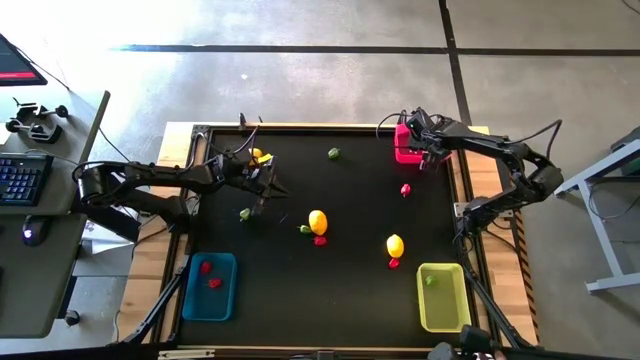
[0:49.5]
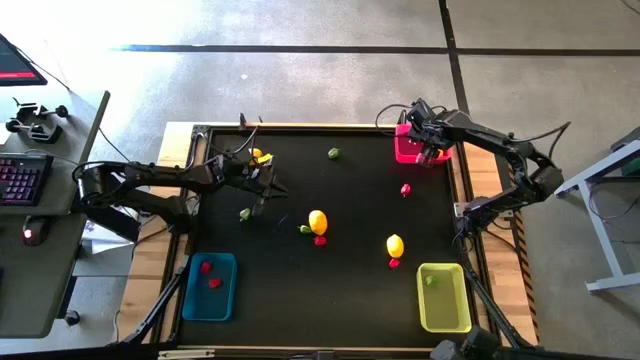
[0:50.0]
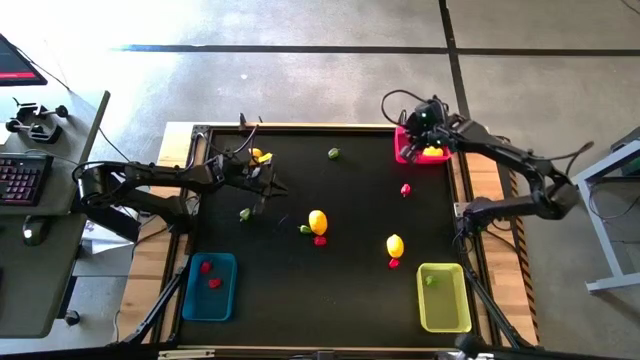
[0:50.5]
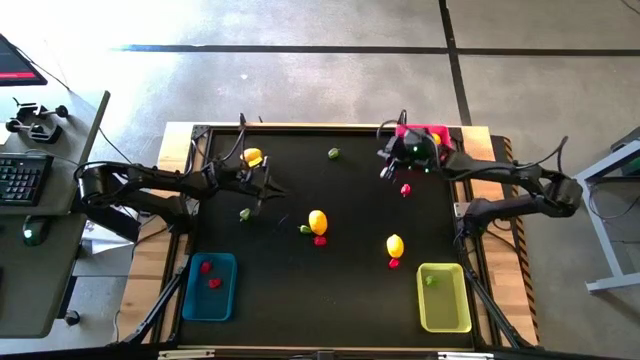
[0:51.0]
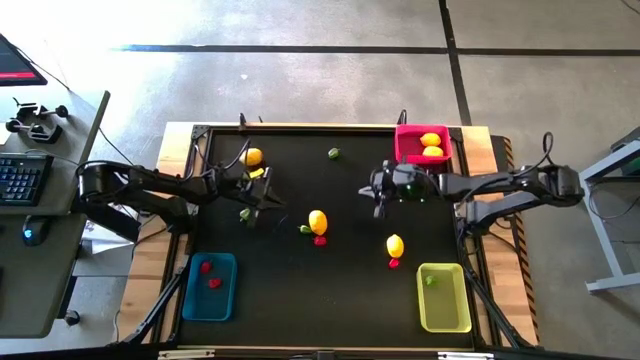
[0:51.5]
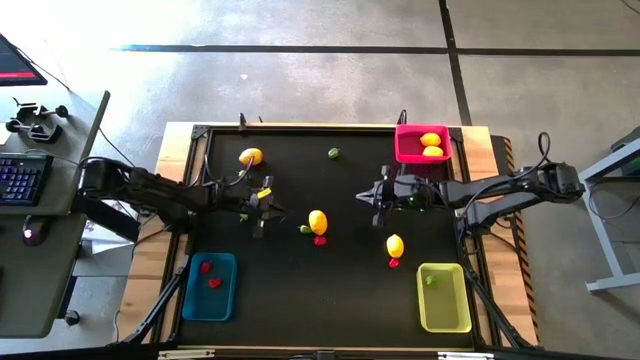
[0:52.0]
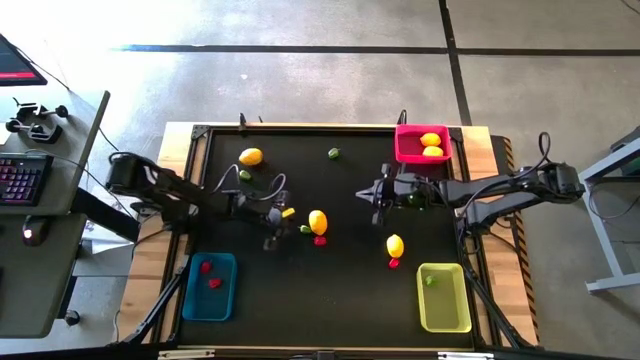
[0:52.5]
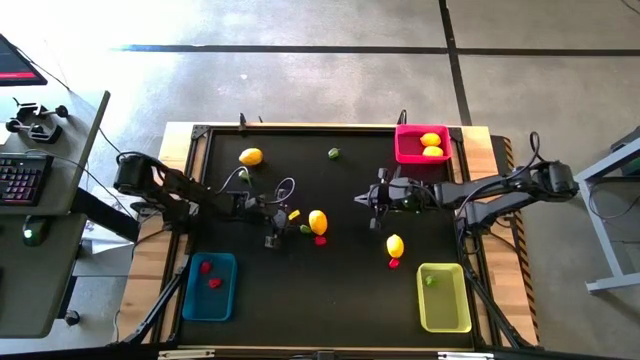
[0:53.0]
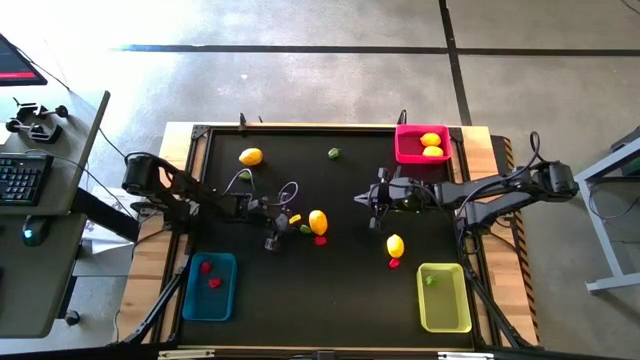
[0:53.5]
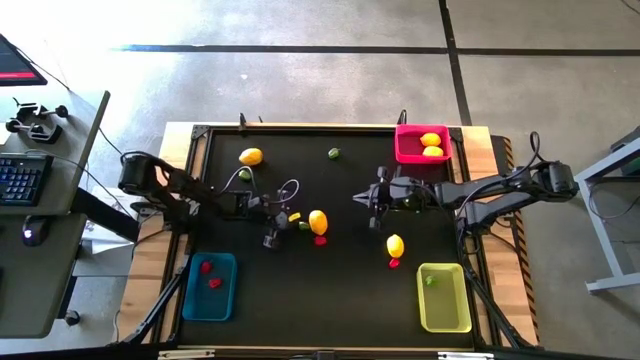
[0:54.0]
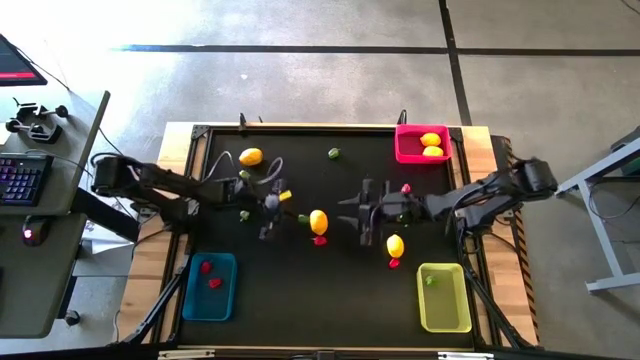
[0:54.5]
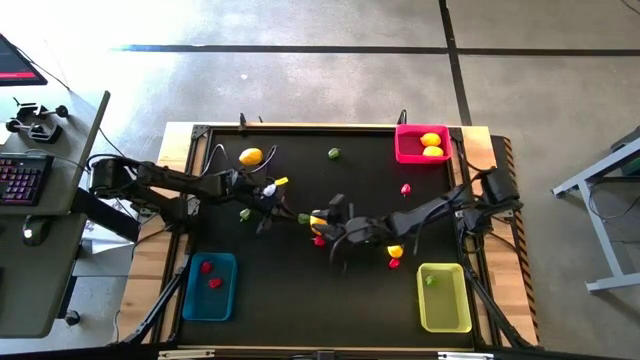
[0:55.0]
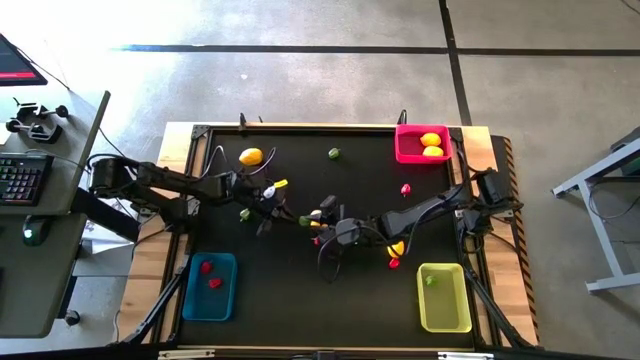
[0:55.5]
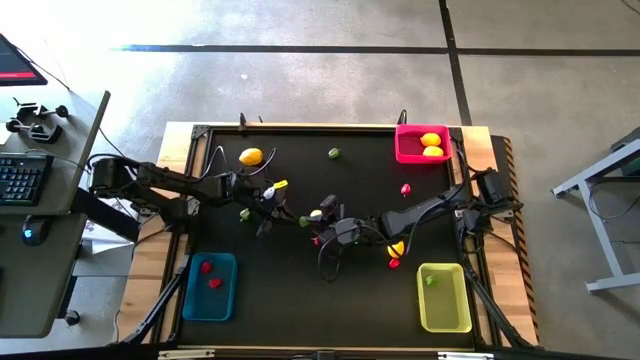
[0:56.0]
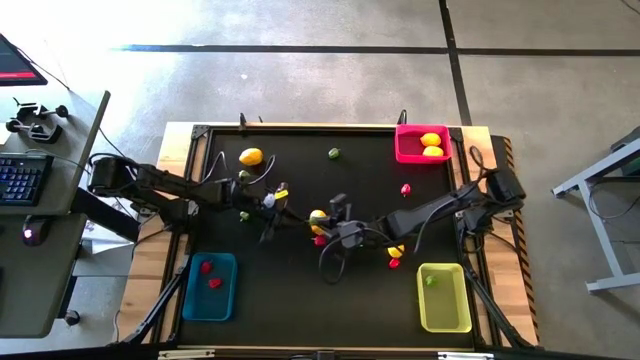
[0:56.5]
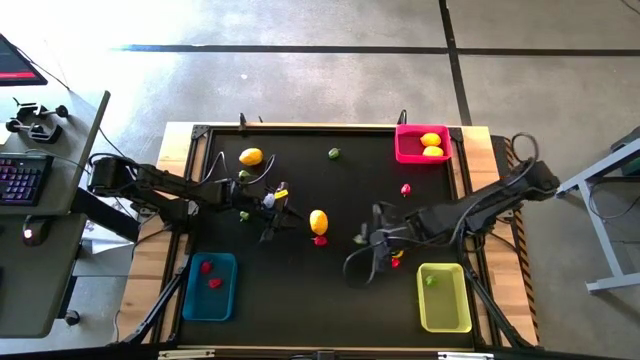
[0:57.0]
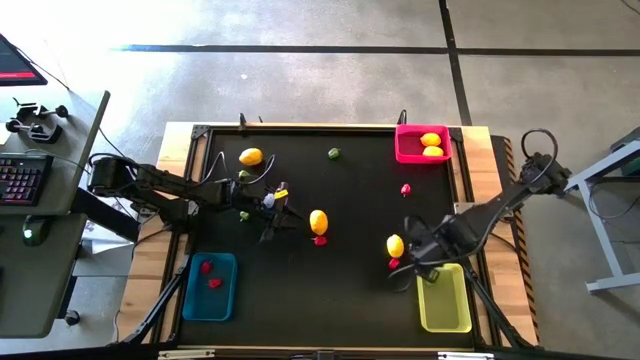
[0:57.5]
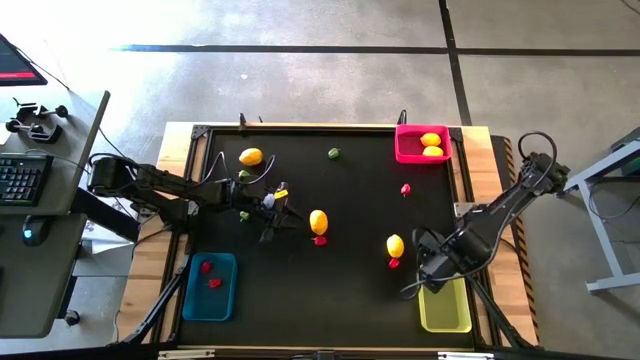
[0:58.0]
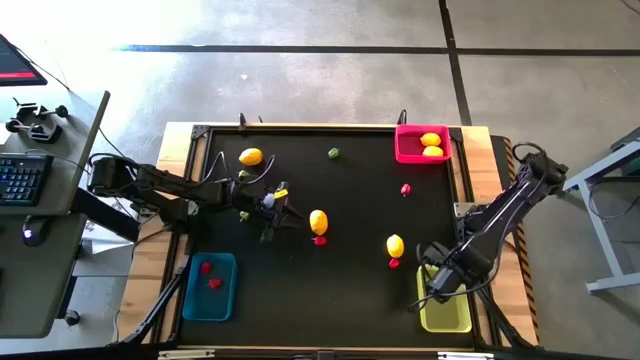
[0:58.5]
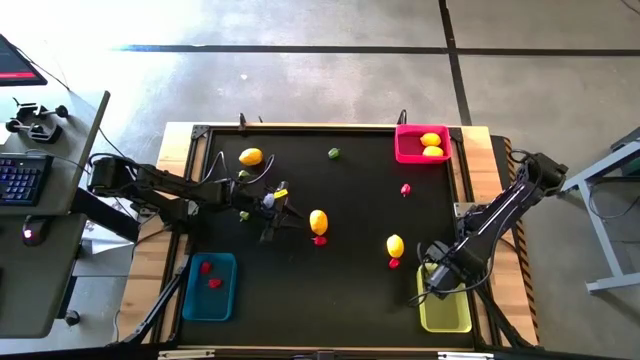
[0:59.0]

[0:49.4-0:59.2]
Task: Sort produce into baskets
Put the green chilli pepper into the yellow bin

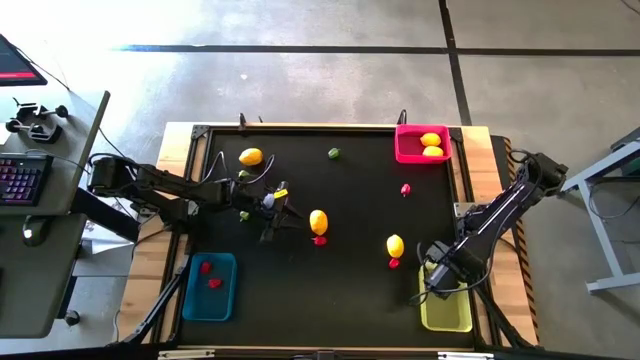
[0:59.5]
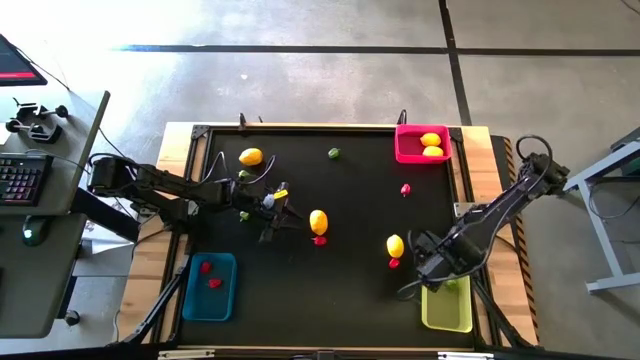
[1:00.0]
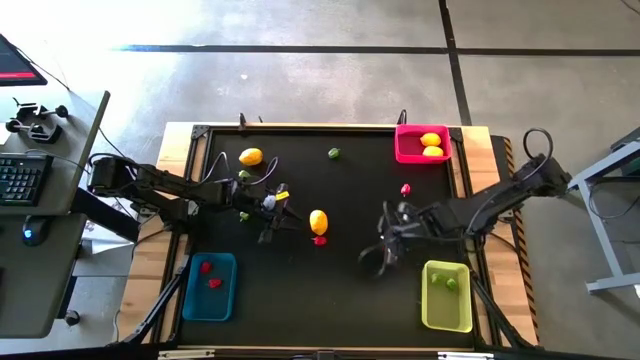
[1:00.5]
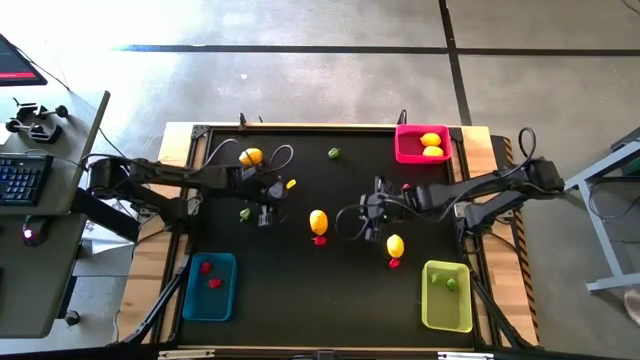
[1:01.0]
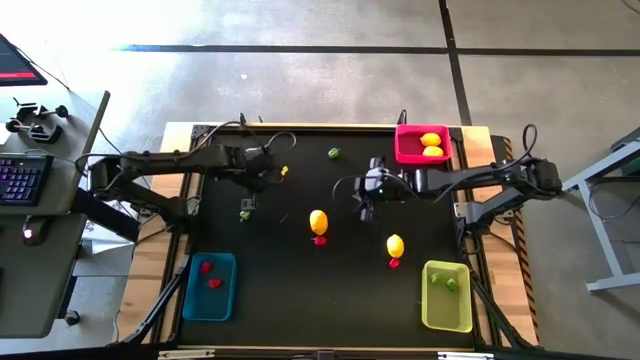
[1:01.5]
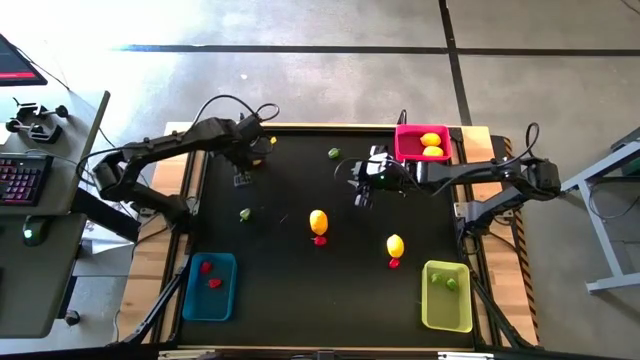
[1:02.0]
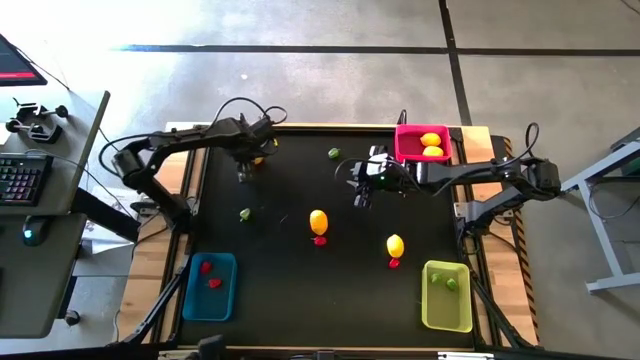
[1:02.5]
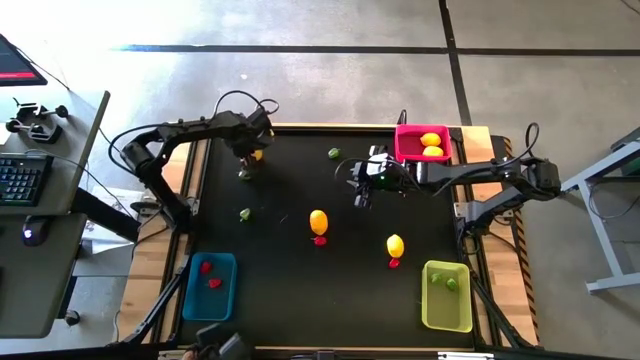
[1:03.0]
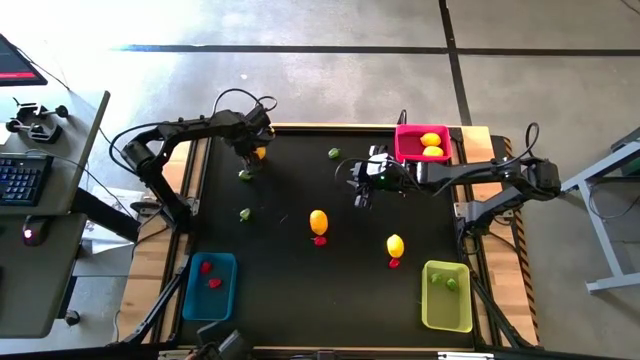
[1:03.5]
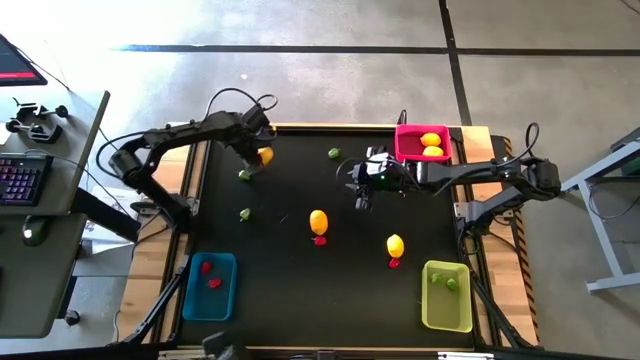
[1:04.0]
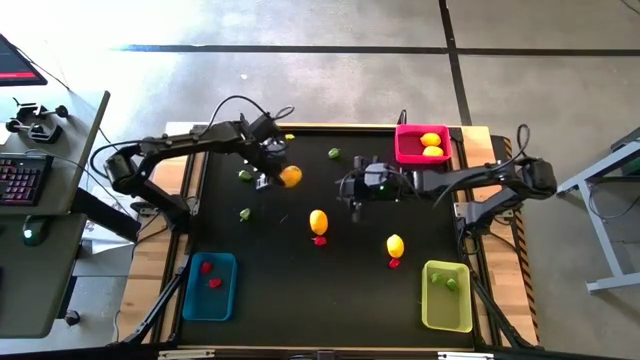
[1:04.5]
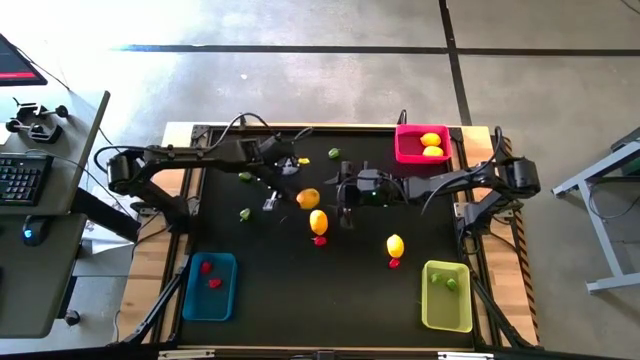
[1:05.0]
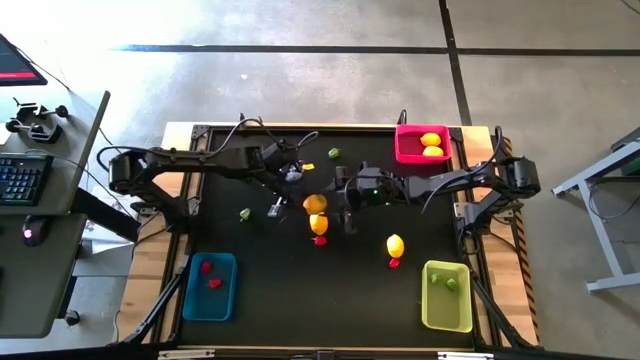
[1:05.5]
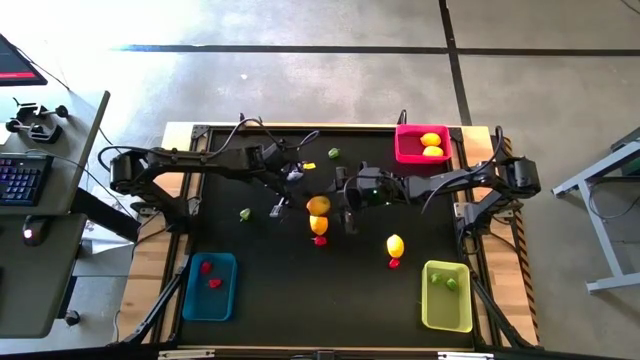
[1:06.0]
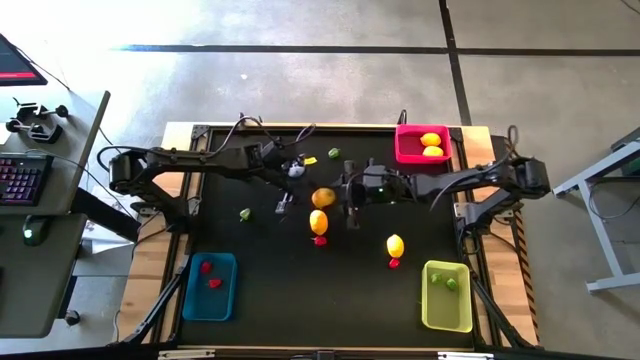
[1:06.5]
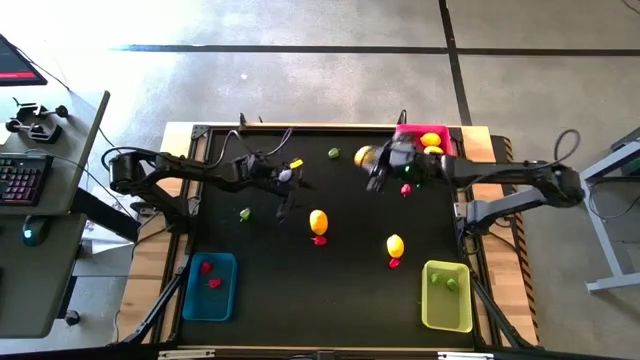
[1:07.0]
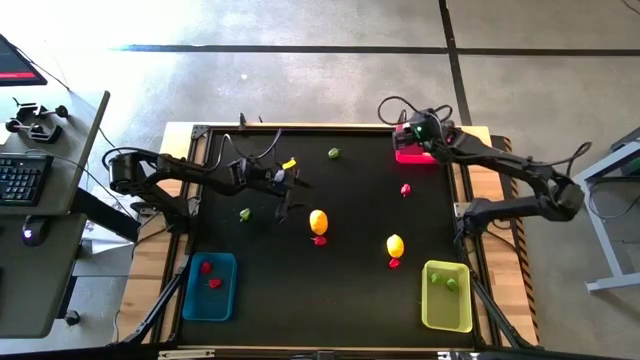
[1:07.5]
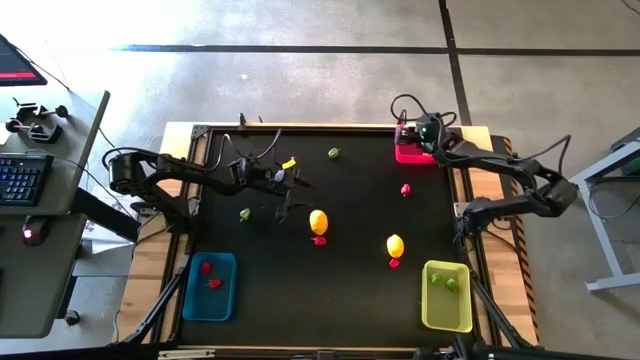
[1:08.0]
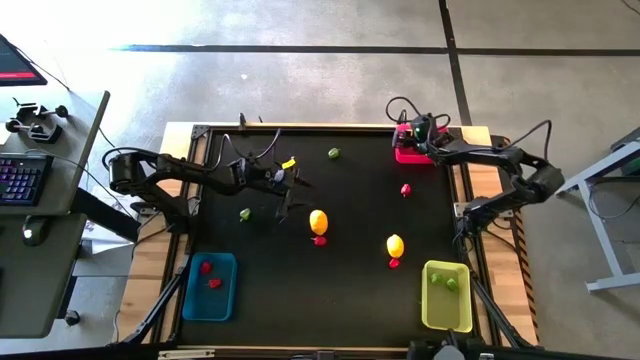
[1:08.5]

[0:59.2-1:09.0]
Put the lemon into the pink bin

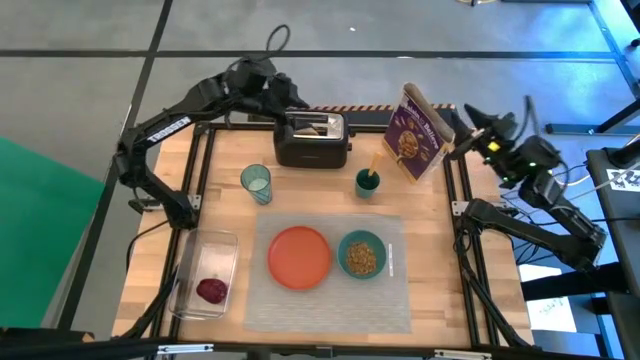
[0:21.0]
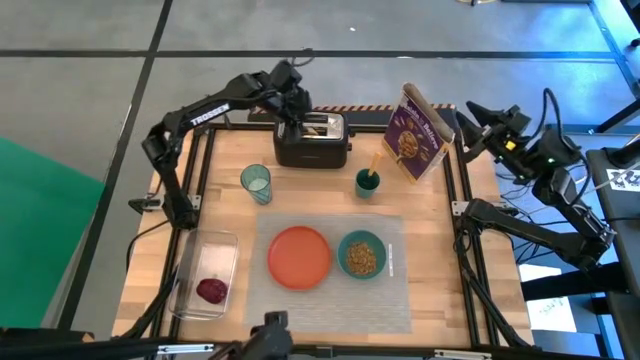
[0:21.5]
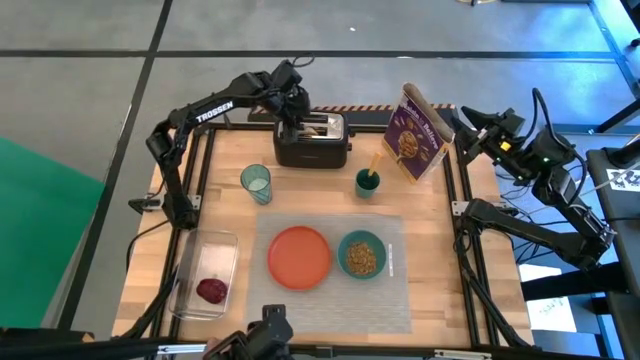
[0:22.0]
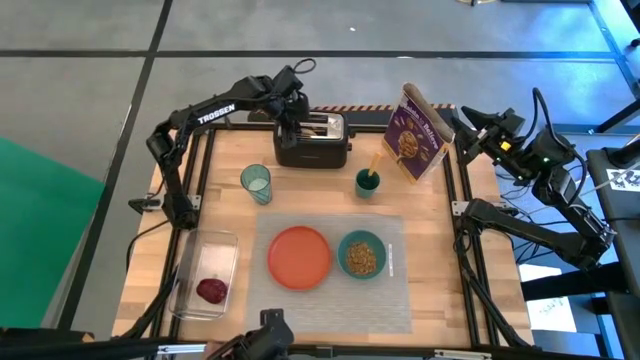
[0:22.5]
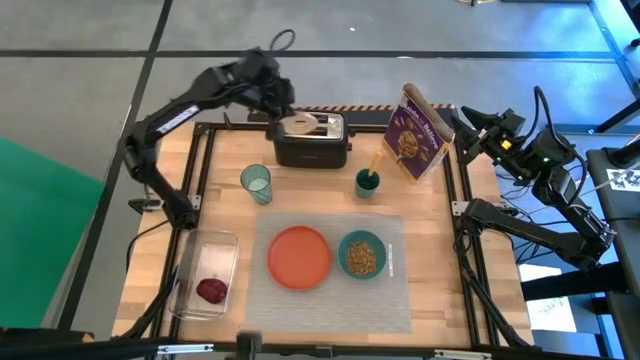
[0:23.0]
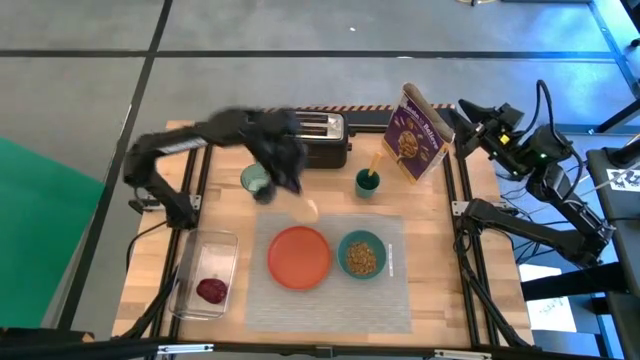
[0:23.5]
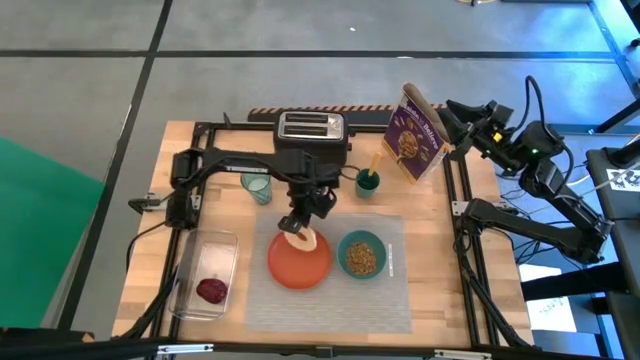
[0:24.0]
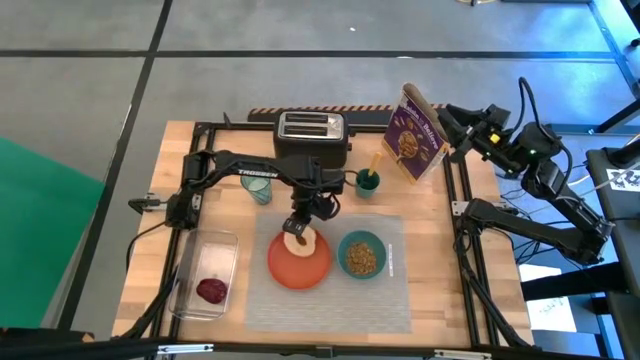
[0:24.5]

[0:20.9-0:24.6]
Task: Arrange a breakfast setting
Put the toasted bagel into the orange plate
